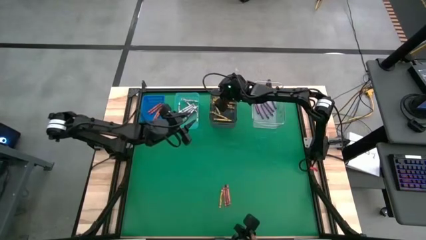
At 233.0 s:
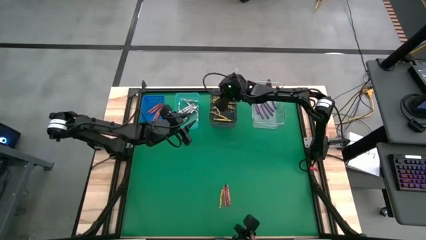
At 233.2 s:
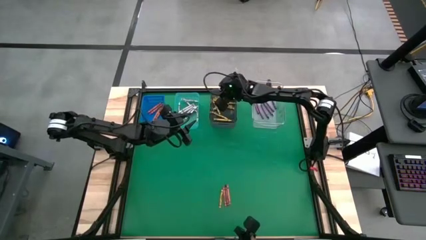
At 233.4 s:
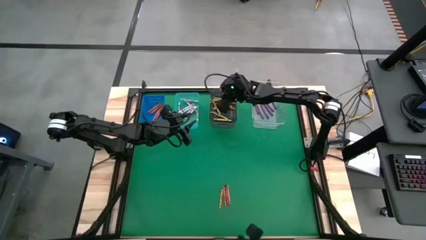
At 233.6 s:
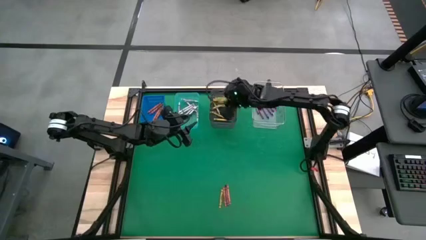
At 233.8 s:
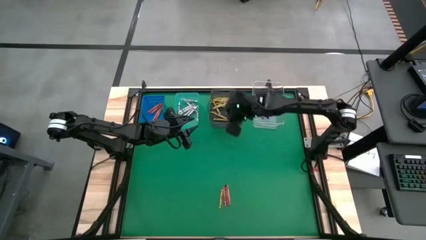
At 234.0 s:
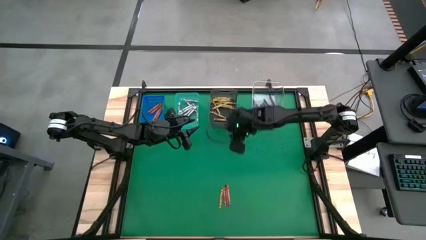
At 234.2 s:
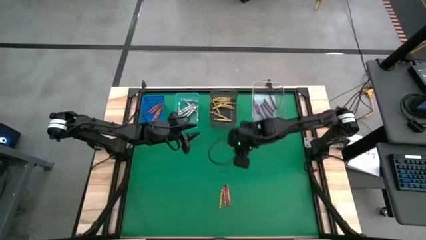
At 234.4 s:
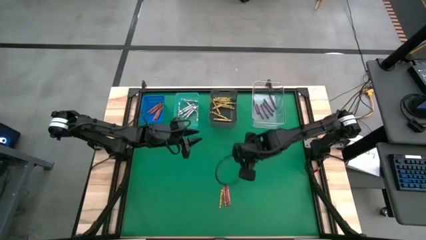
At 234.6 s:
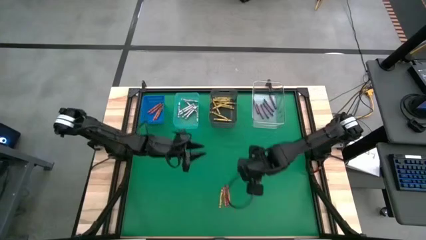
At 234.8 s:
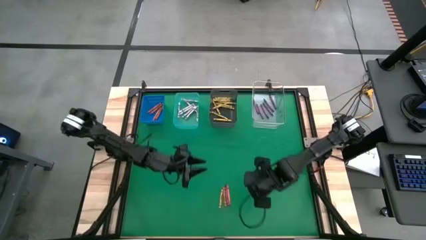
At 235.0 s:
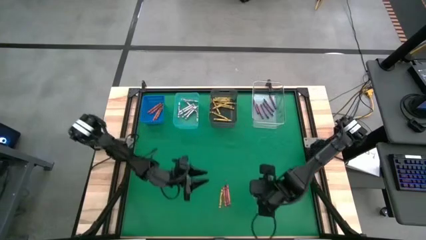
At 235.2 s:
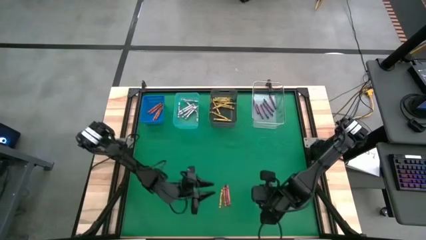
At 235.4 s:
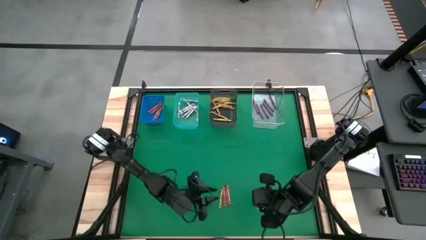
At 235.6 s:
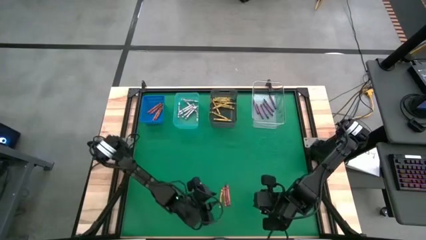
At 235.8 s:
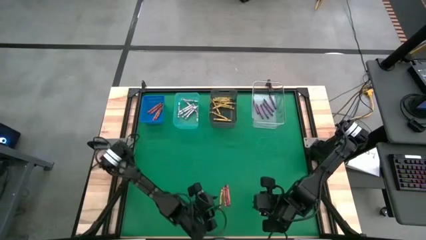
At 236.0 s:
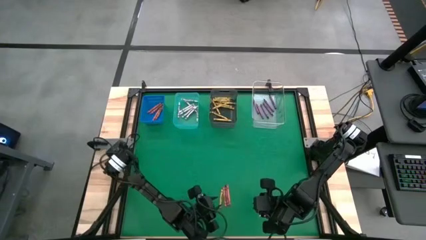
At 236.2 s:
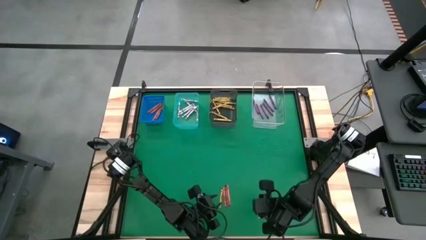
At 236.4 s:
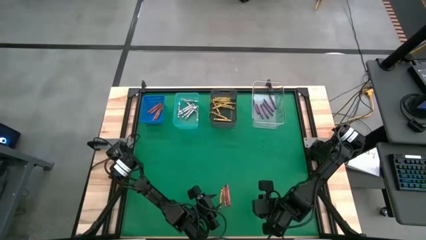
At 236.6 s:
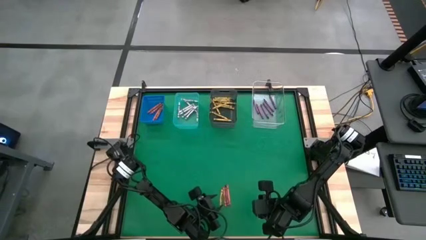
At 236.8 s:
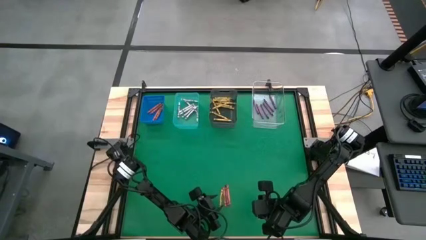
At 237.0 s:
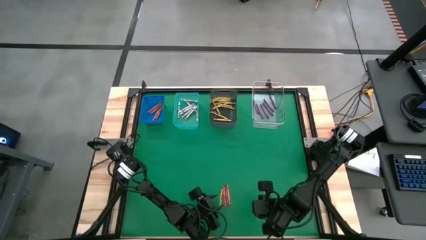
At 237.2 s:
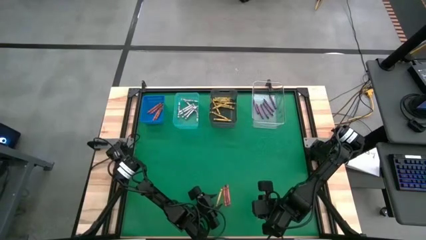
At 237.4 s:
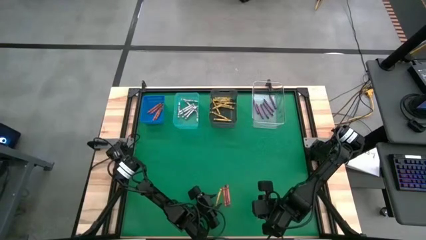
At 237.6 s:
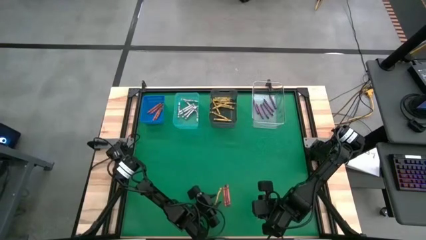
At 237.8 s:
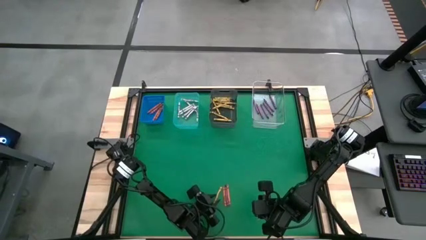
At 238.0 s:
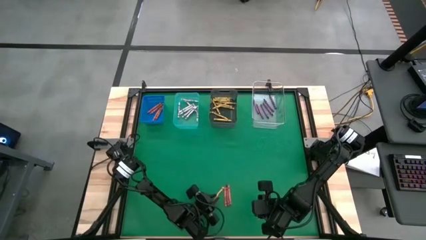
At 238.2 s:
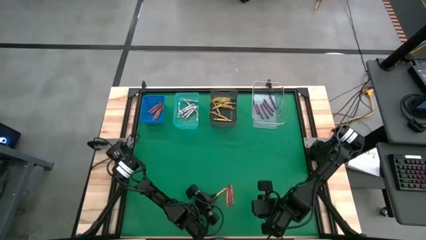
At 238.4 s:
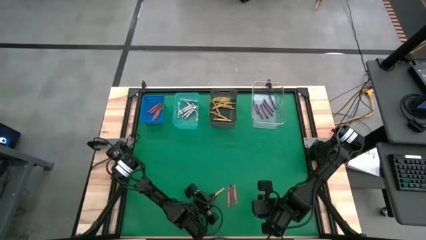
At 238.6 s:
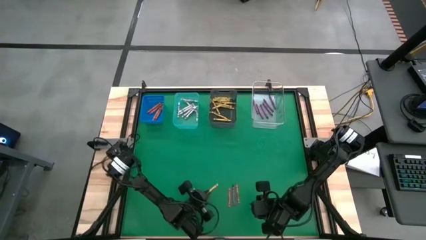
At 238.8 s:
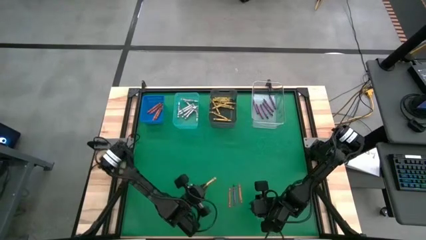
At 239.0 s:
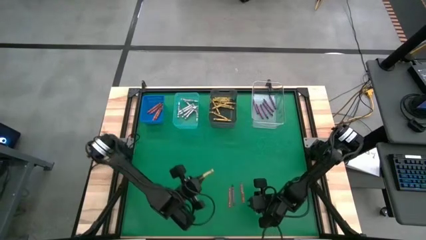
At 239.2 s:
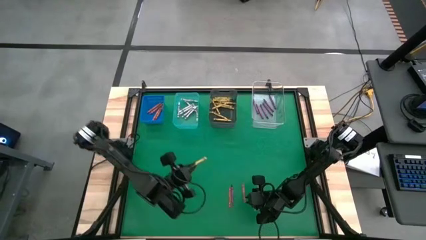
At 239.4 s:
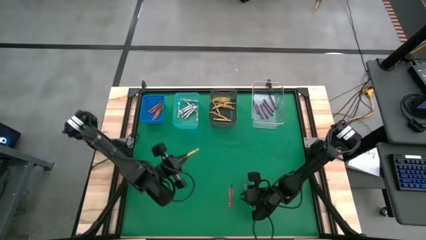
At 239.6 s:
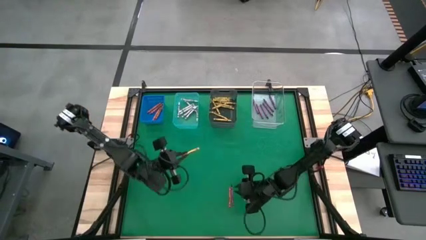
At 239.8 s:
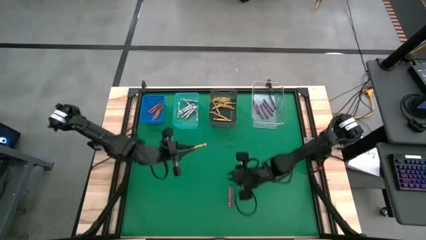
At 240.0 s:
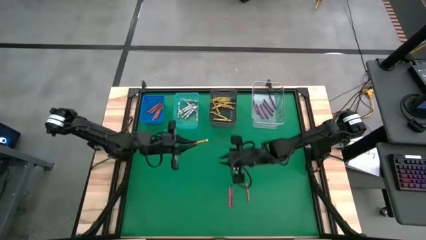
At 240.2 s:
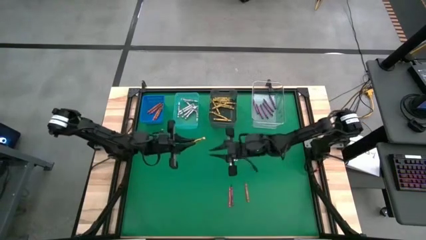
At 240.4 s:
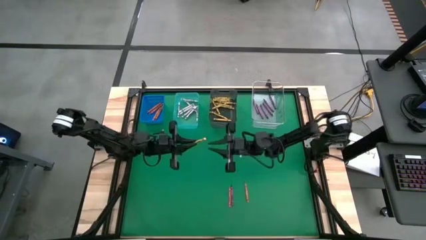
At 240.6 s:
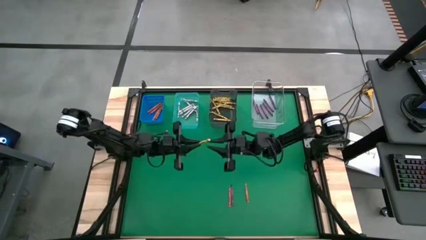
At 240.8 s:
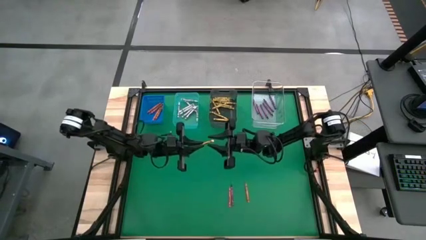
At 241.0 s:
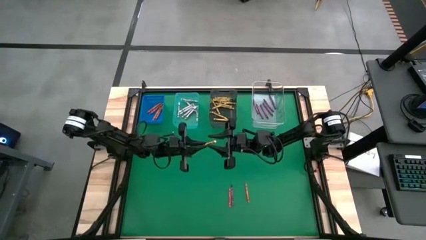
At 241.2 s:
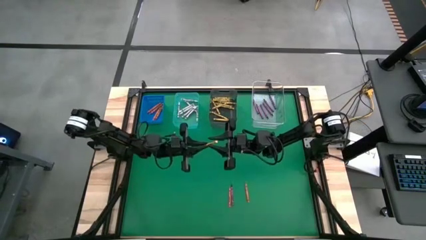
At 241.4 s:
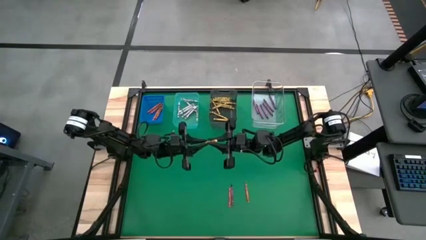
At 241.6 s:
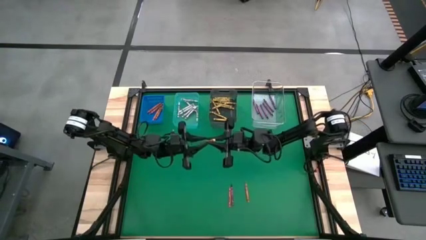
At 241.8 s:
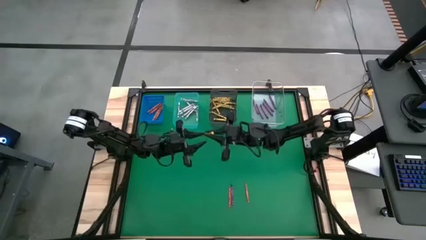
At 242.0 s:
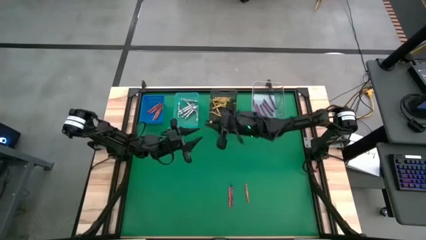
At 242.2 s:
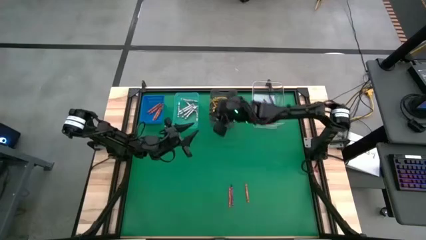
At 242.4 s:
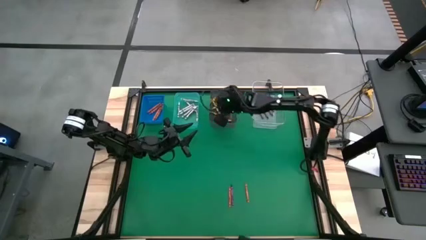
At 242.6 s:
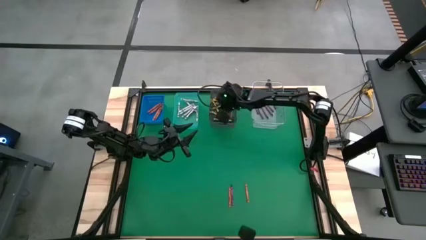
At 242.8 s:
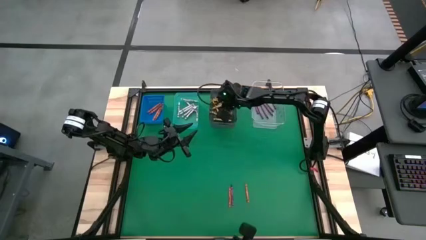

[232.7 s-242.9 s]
Task: Sort crayons
Put the yellow crayon into the black bin

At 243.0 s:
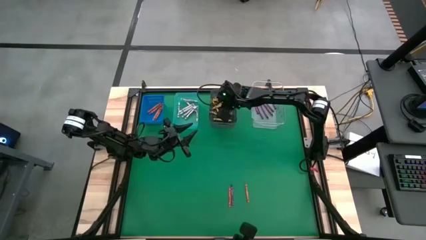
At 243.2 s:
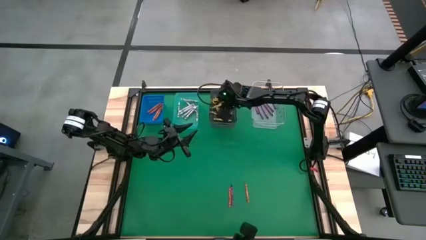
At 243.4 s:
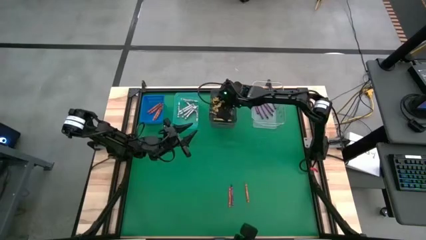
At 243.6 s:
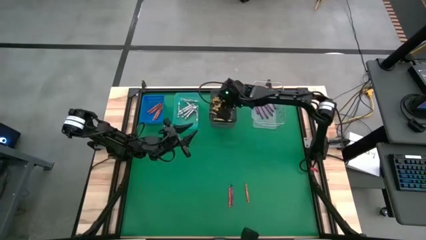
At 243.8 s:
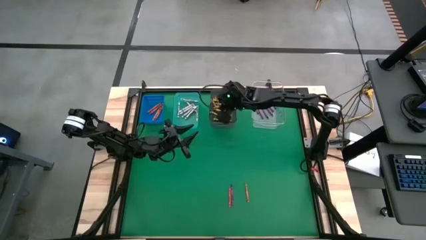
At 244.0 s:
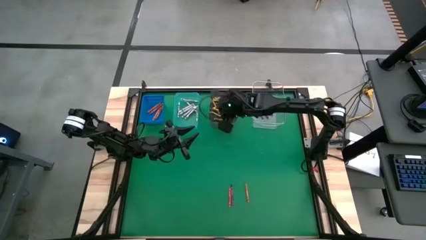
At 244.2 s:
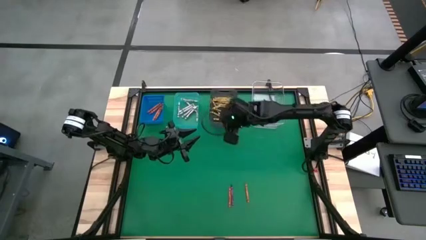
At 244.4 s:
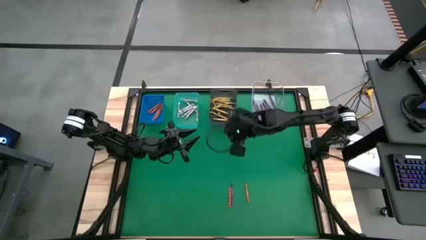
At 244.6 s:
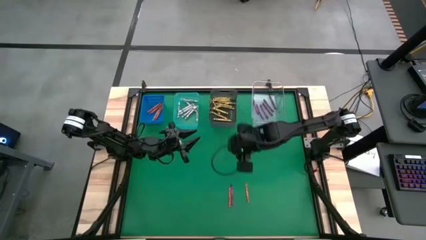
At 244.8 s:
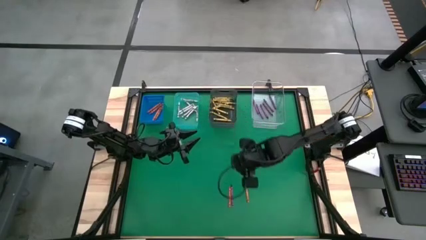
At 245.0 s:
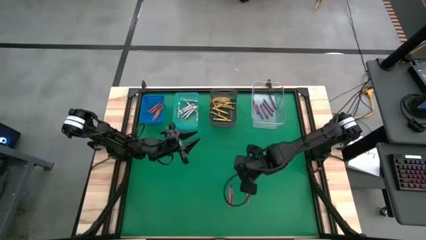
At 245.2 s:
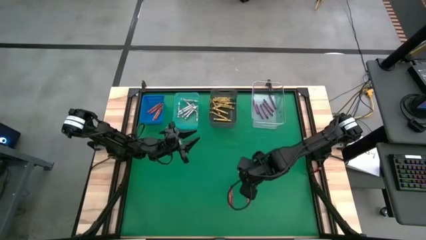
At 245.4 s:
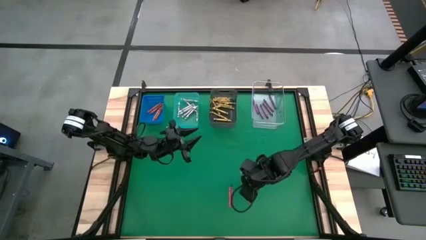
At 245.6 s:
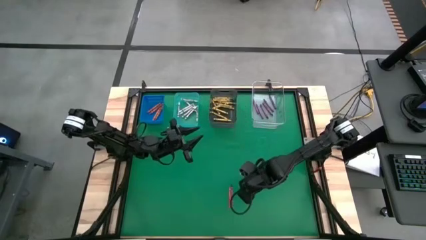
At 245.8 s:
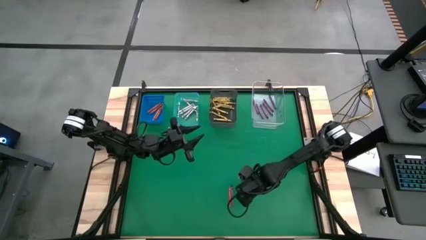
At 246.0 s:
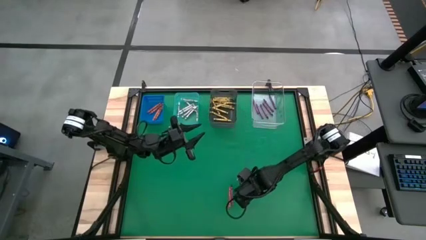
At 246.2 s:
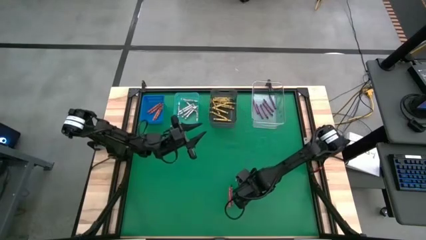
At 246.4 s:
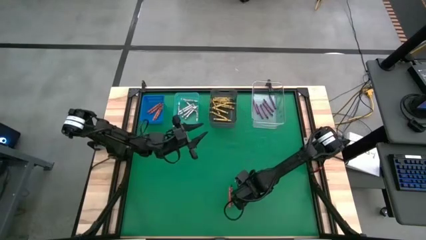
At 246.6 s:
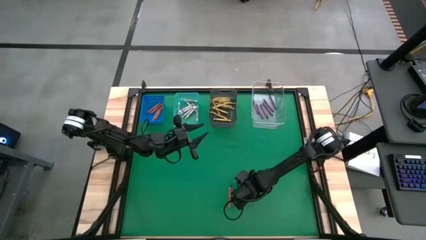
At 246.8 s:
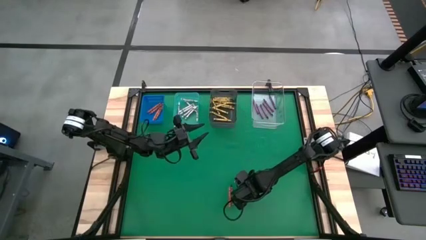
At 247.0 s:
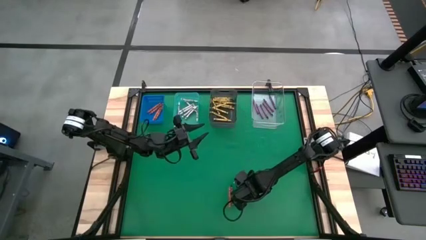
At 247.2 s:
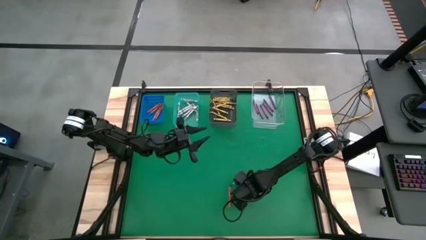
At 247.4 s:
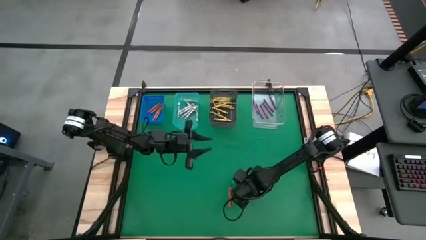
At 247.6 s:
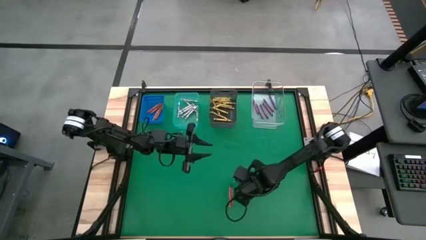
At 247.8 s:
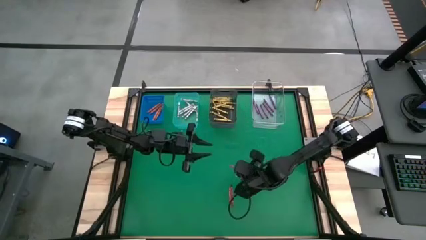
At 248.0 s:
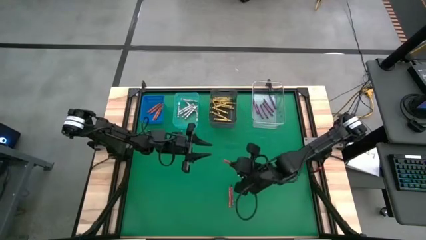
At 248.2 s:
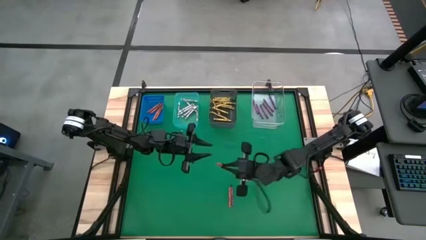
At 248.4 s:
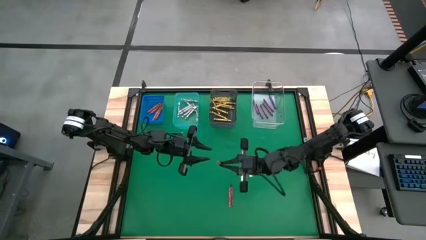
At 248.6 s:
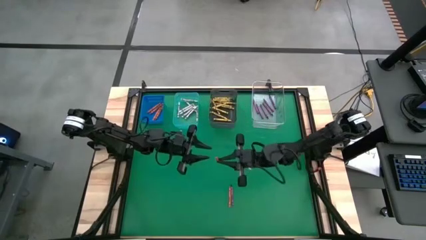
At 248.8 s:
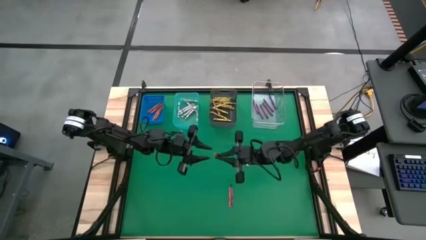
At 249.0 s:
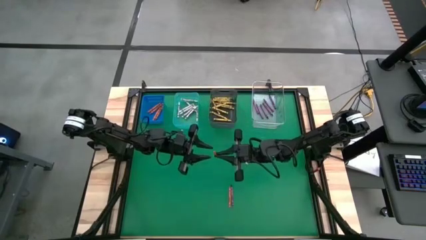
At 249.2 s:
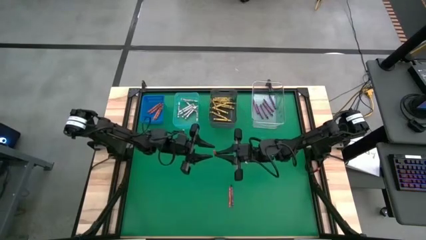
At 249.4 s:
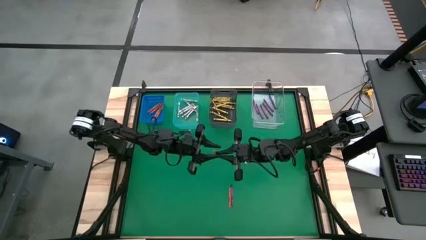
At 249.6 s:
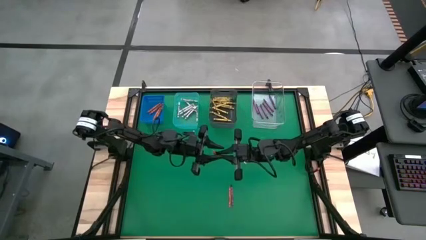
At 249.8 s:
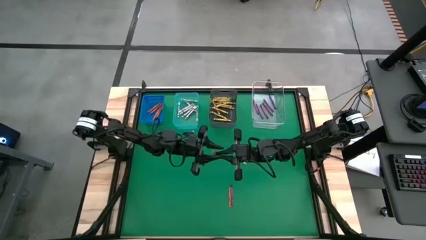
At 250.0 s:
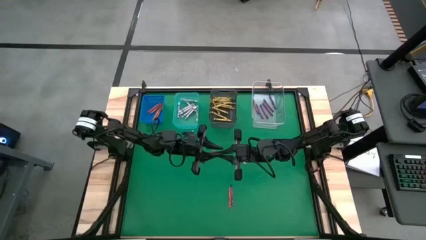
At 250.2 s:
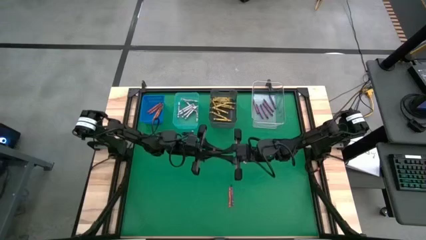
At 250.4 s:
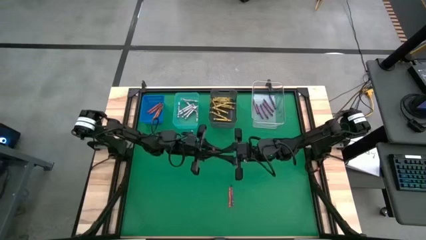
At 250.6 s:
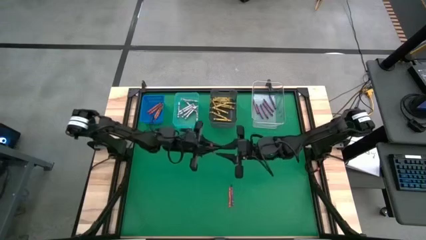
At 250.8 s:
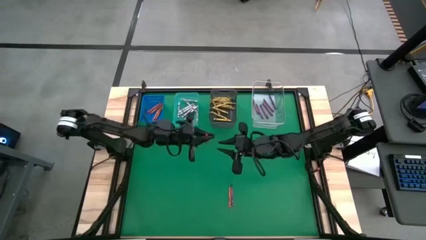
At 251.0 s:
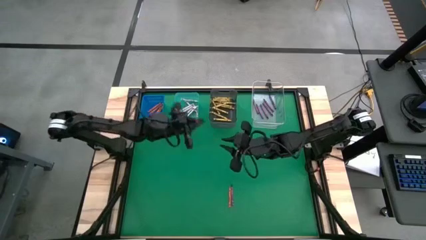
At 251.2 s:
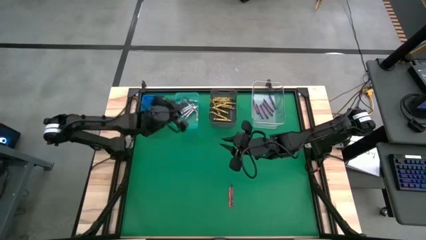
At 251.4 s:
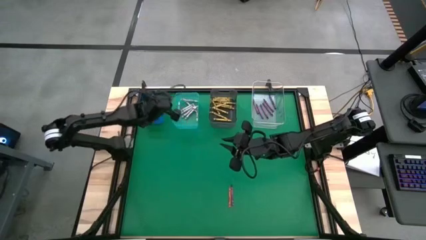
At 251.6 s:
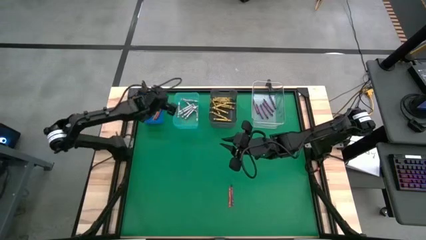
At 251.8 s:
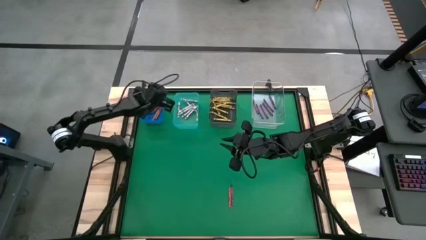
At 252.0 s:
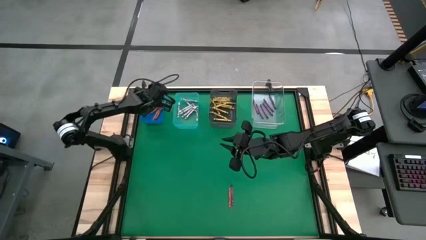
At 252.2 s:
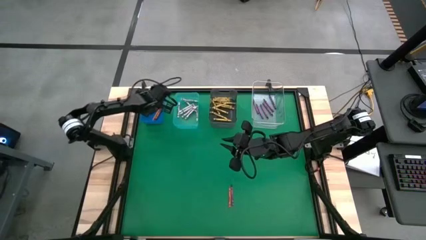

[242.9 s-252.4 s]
Put the red crayon into the blue bin
